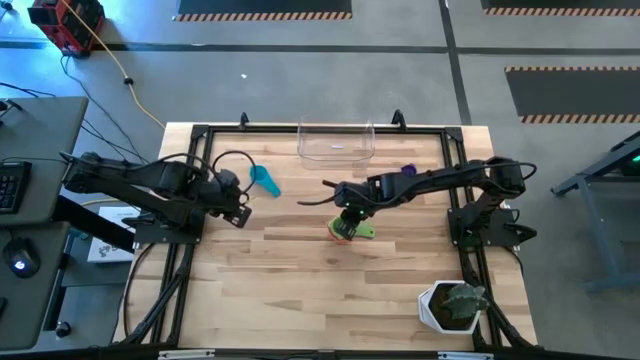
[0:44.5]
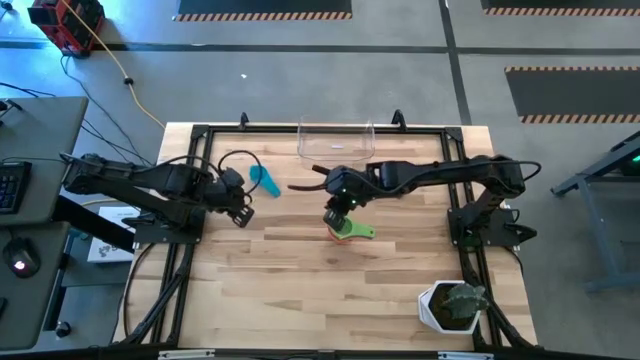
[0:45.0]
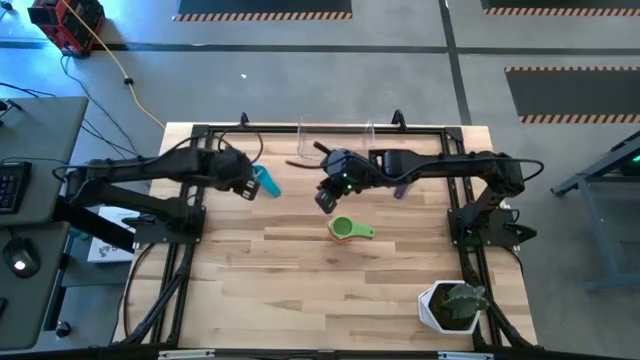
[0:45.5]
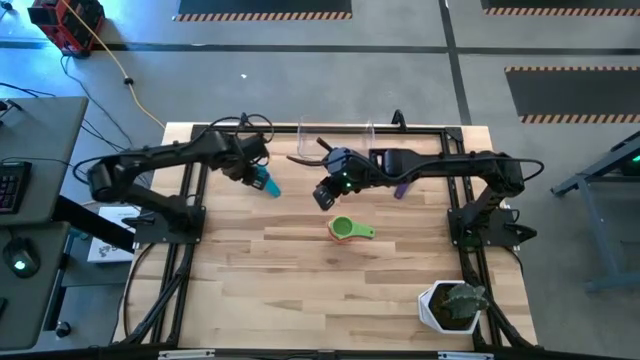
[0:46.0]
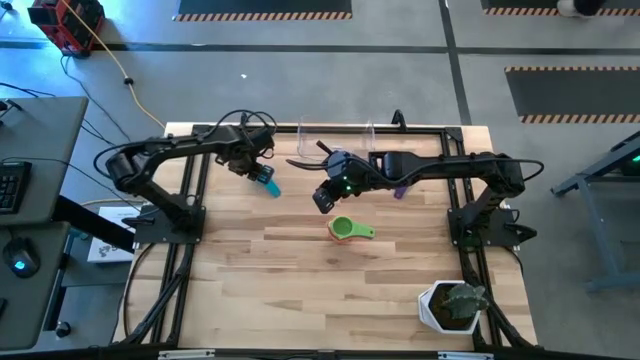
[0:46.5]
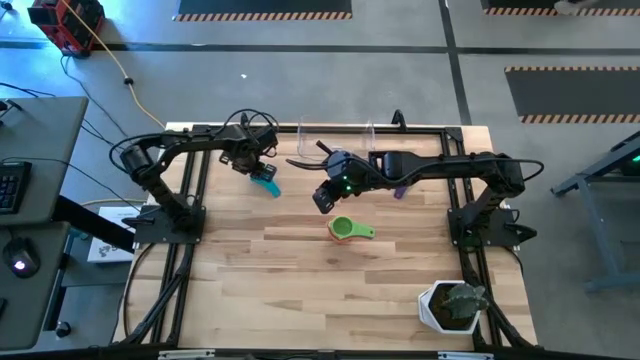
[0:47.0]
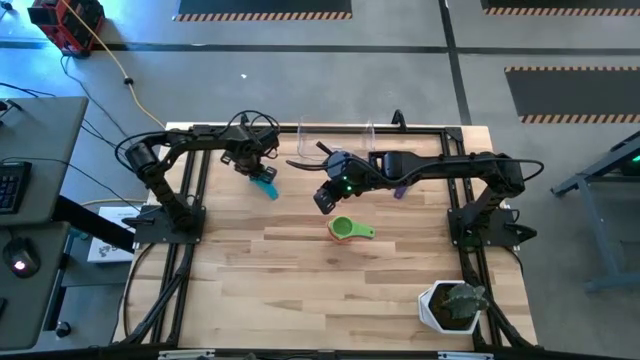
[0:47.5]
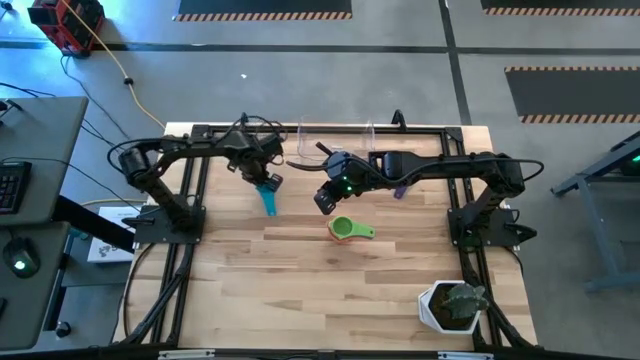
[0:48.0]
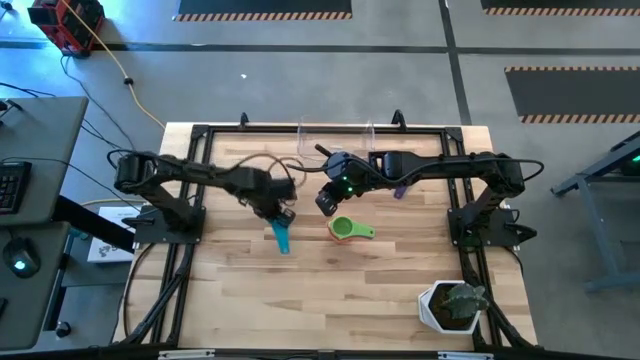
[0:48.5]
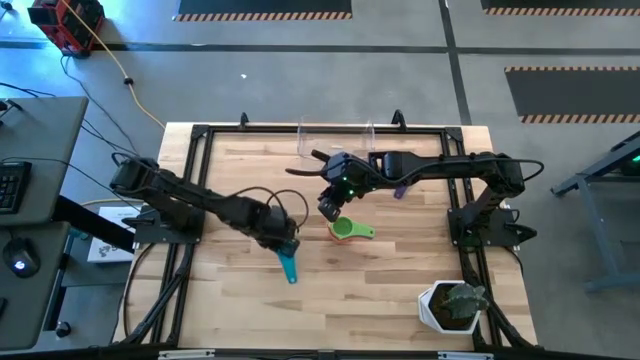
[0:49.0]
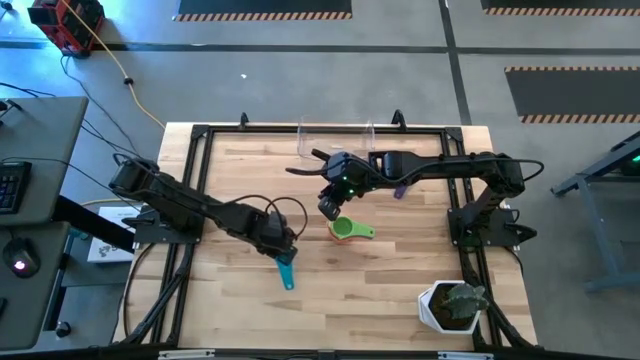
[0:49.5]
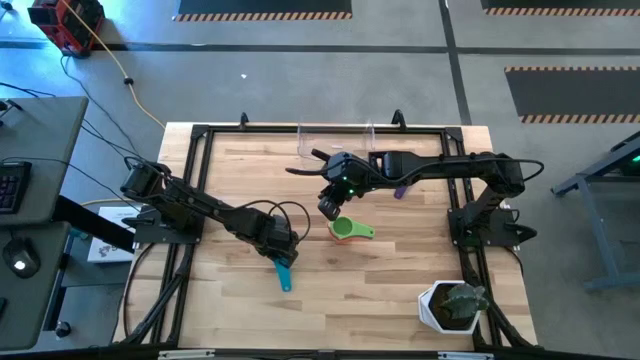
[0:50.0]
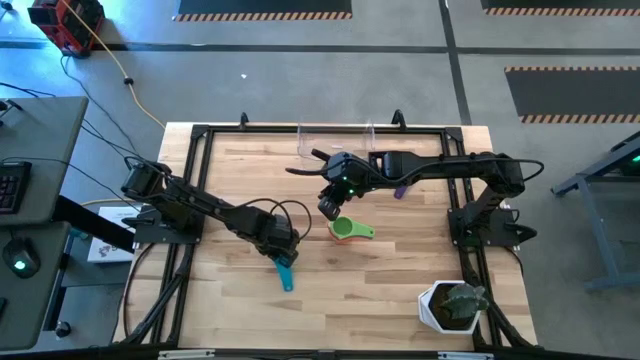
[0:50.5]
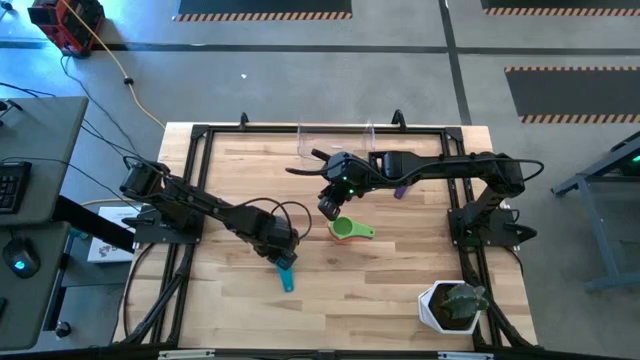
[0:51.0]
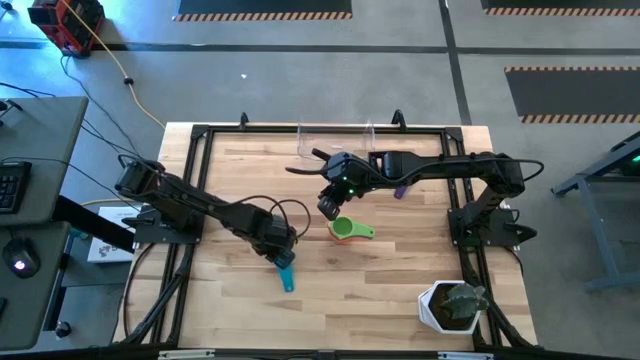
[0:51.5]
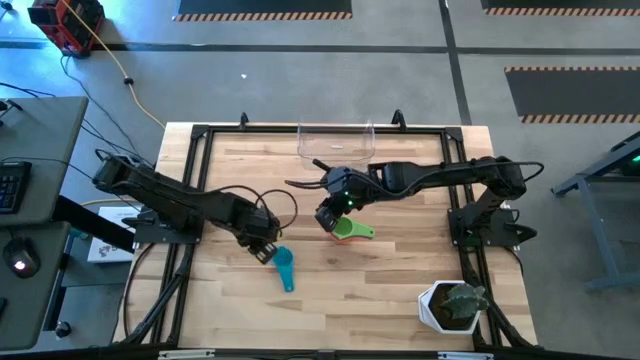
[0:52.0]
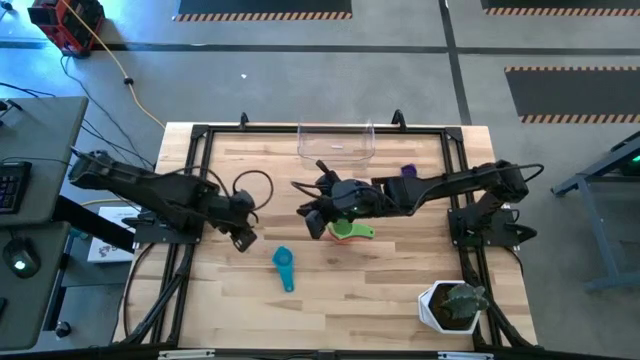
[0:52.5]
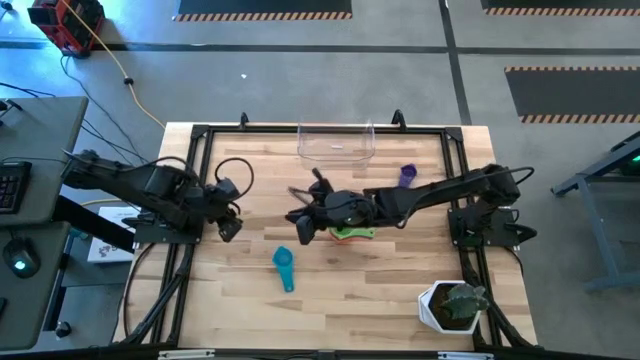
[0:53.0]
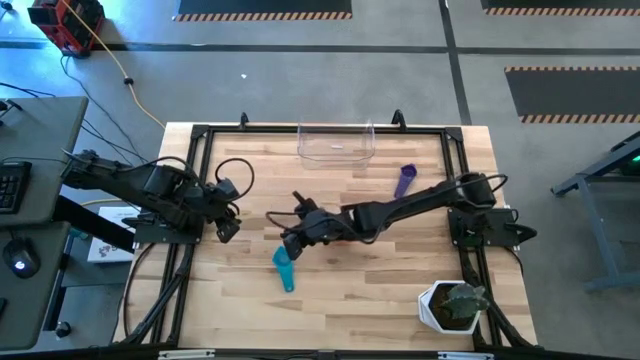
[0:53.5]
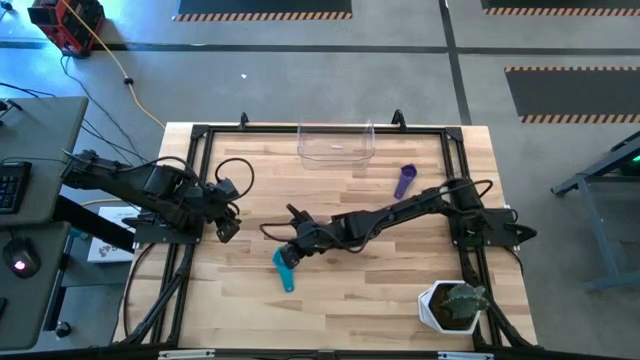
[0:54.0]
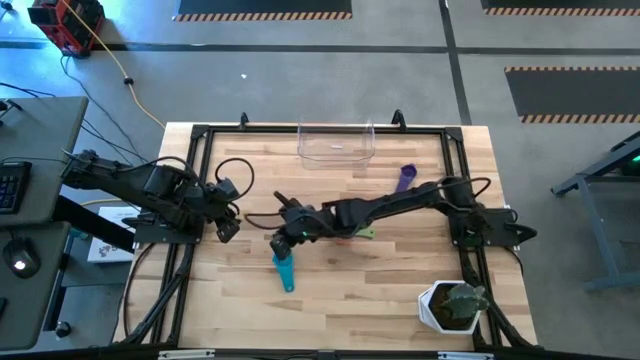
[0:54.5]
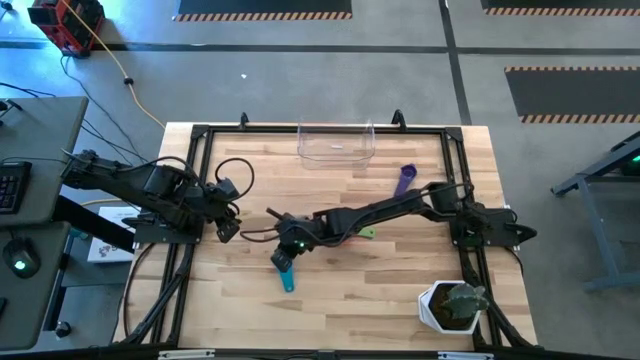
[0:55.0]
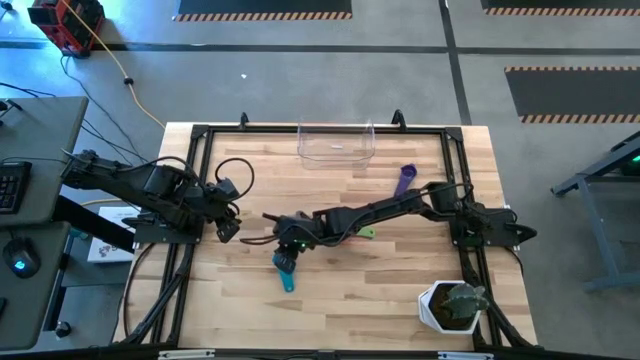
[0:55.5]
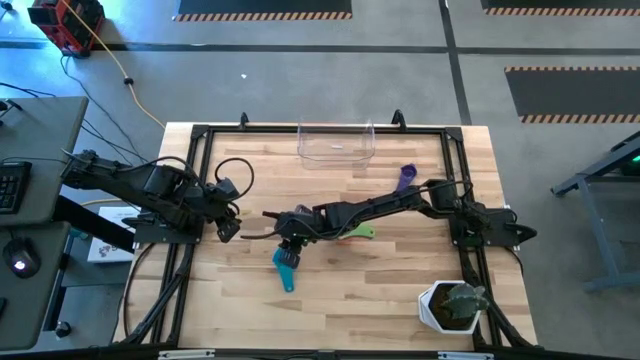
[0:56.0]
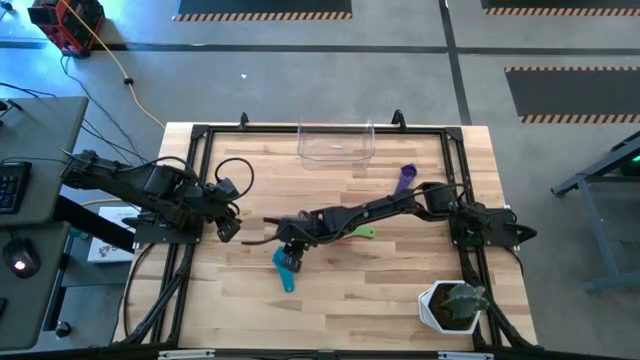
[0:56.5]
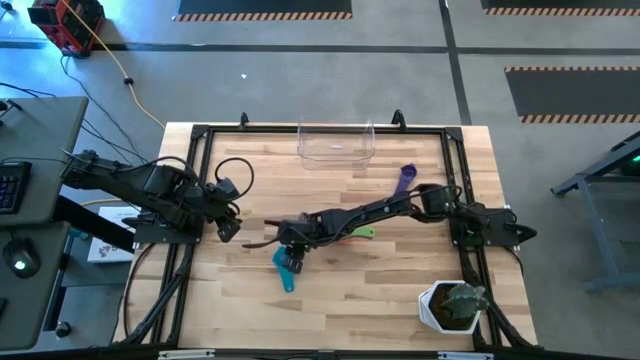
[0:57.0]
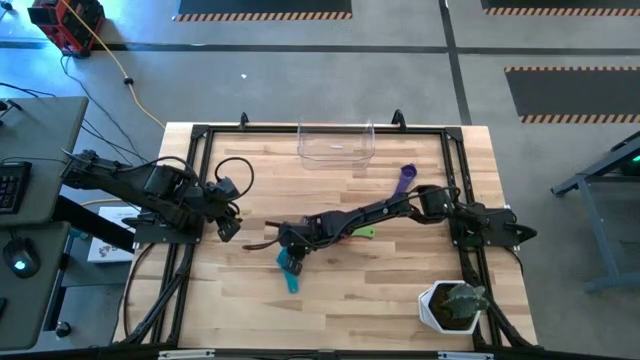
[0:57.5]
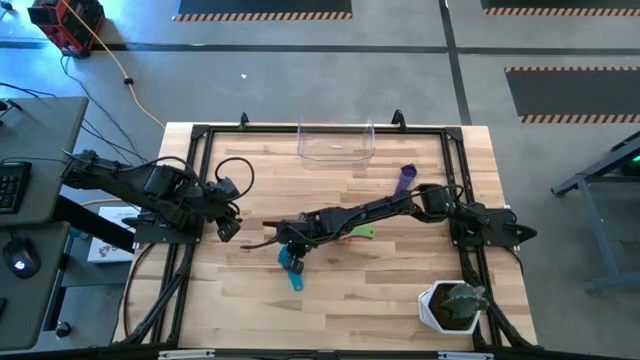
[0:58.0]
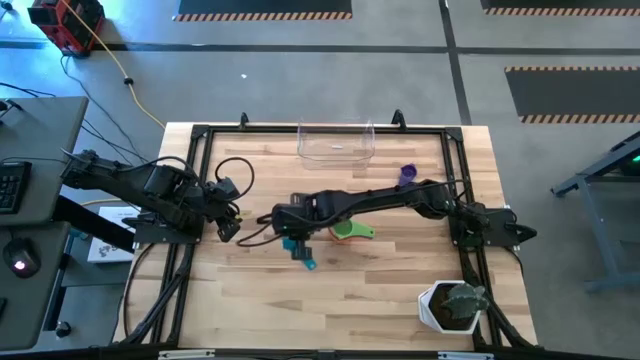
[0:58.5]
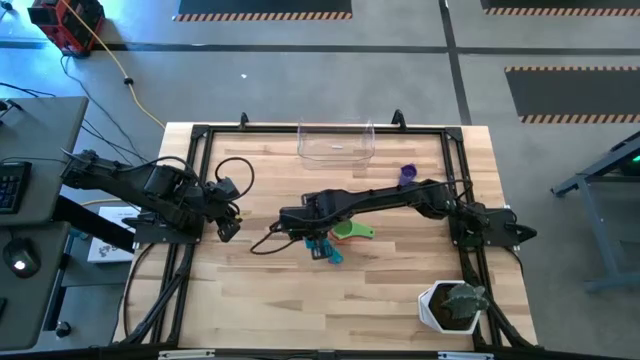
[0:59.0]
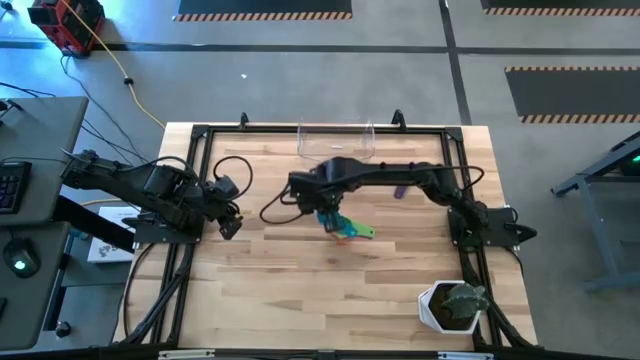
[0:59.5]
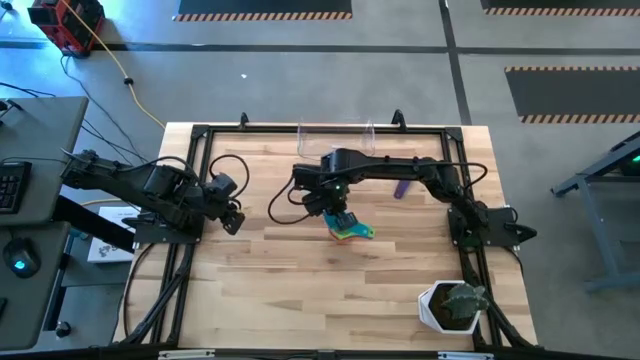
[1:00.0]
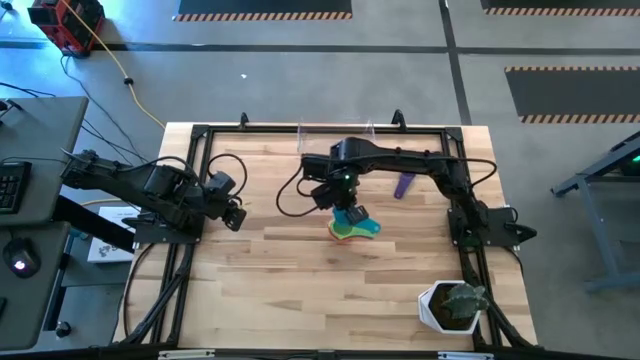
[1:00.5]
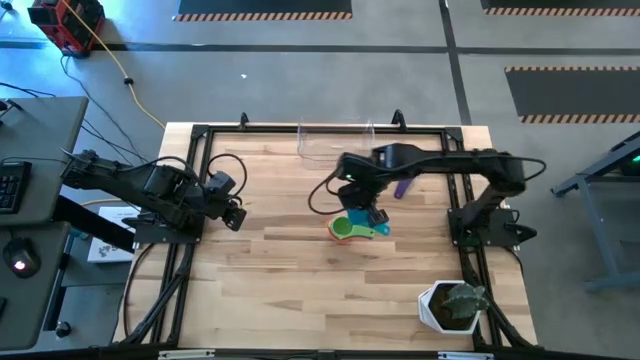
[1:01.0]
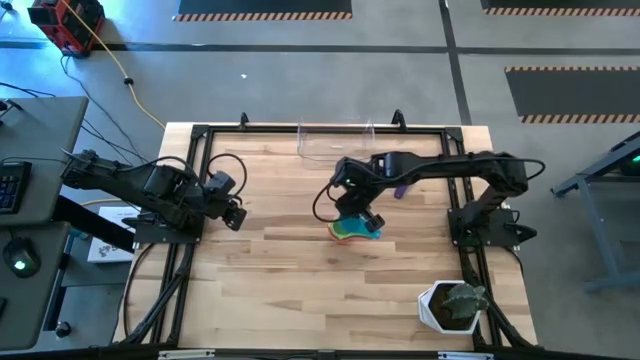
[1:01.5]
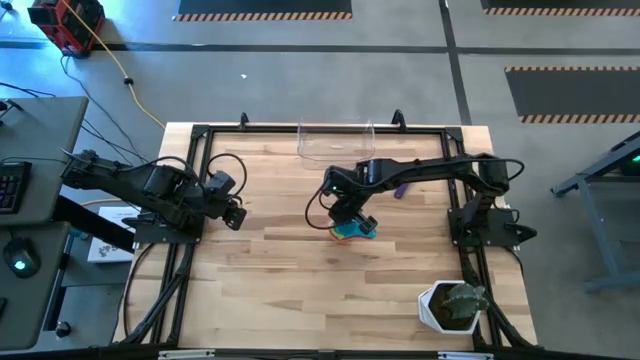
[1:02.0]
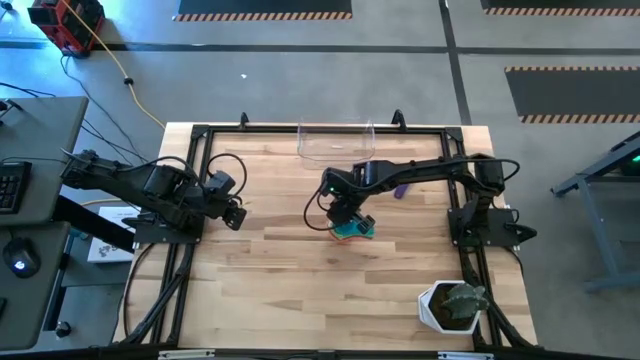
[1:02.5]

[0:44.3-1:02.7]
Task: Nest measuring cups in basket
Stack the light blue measuring cup on top of the green measuring cup
